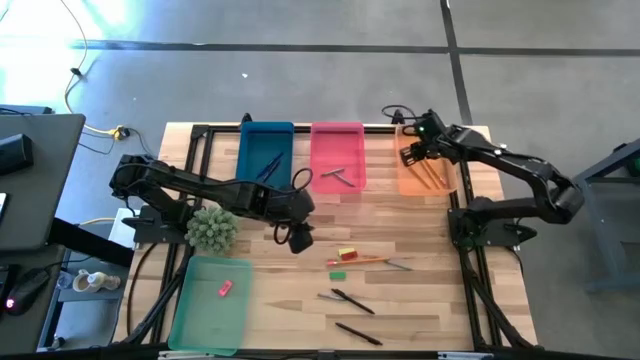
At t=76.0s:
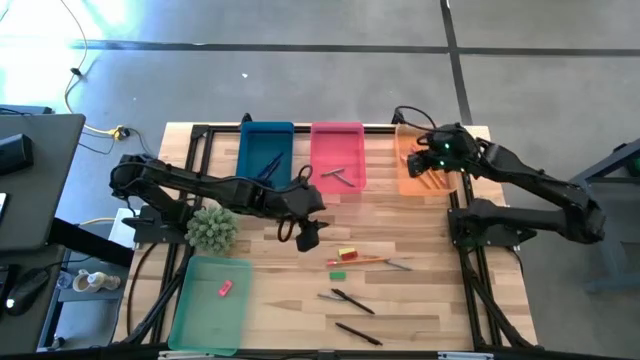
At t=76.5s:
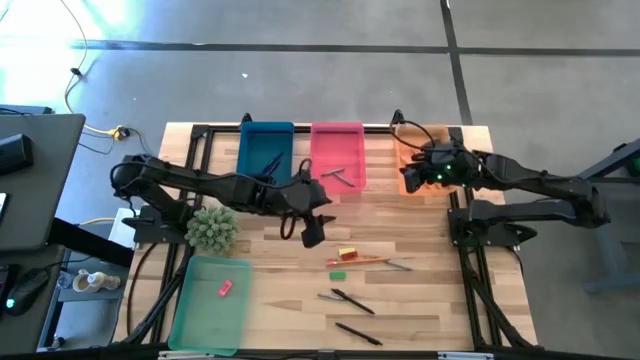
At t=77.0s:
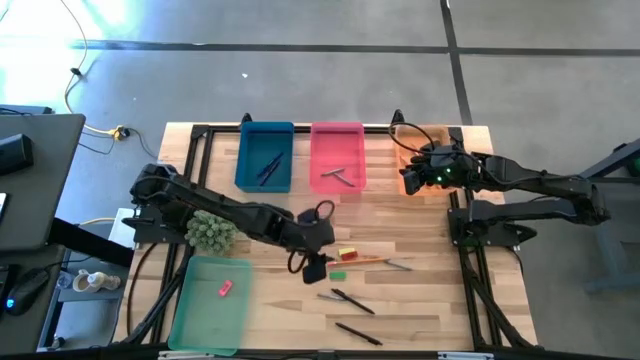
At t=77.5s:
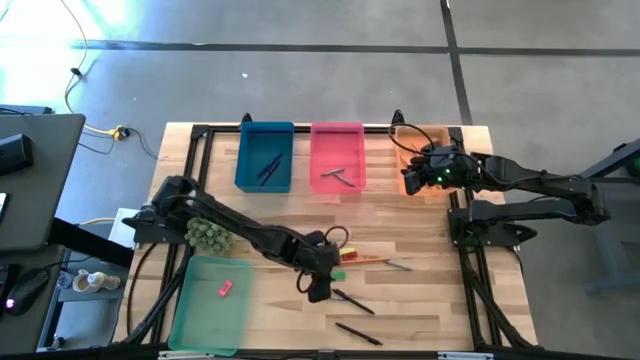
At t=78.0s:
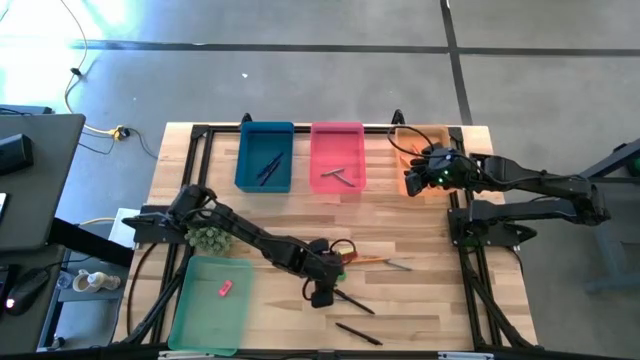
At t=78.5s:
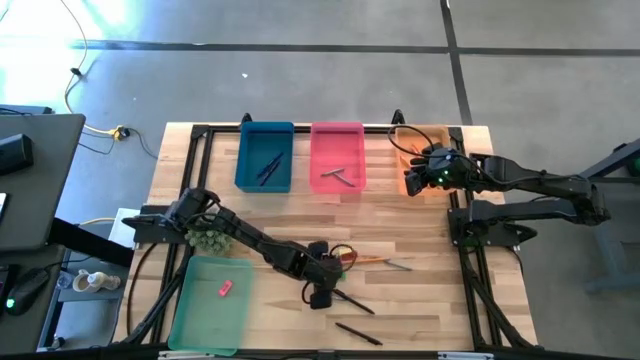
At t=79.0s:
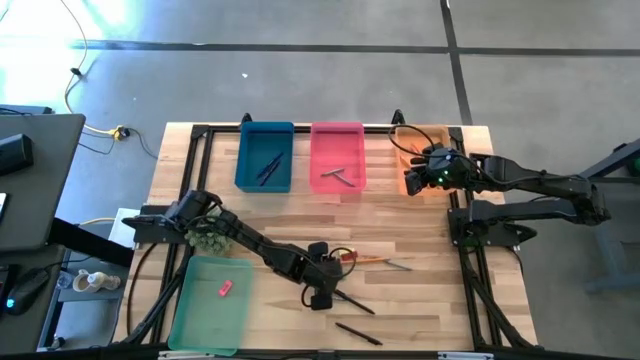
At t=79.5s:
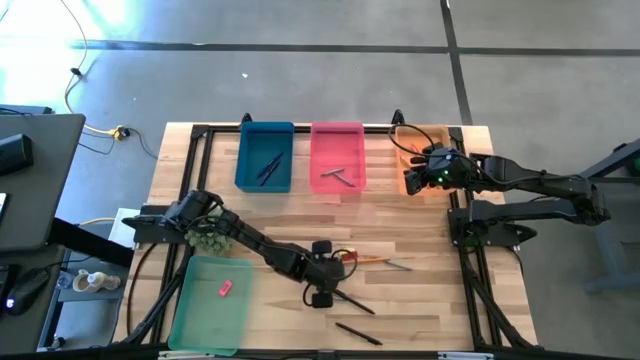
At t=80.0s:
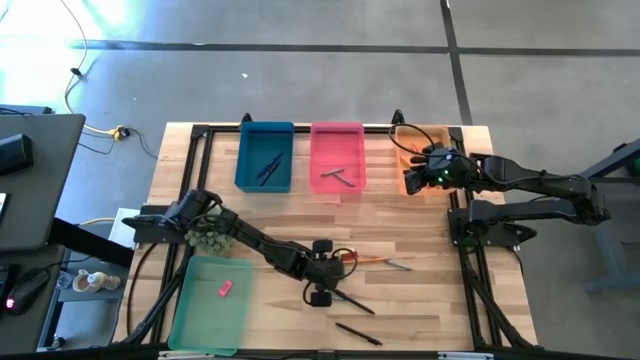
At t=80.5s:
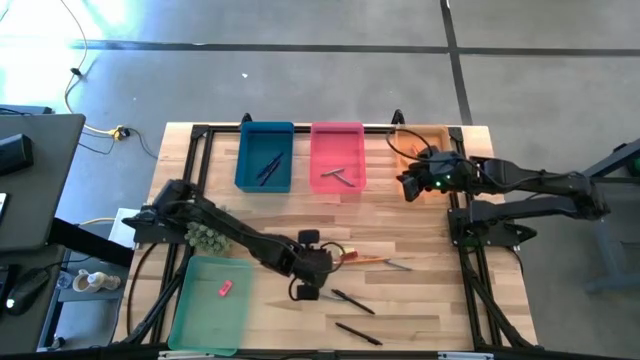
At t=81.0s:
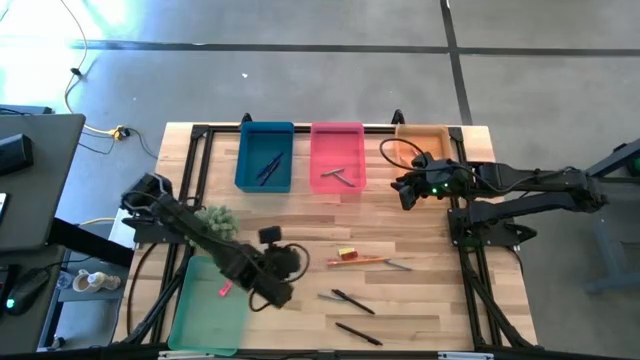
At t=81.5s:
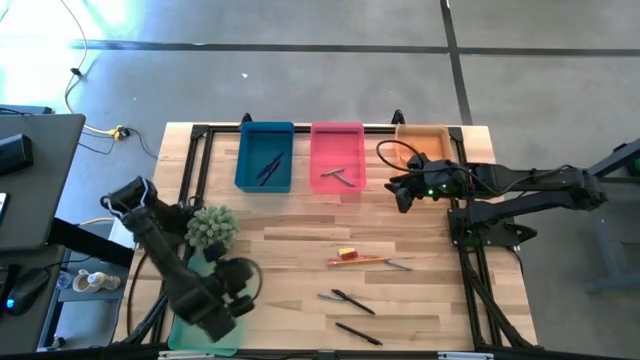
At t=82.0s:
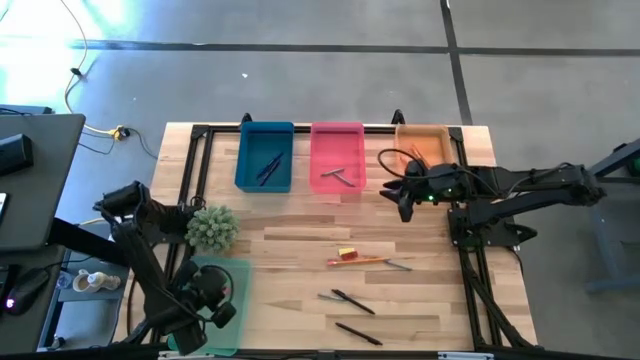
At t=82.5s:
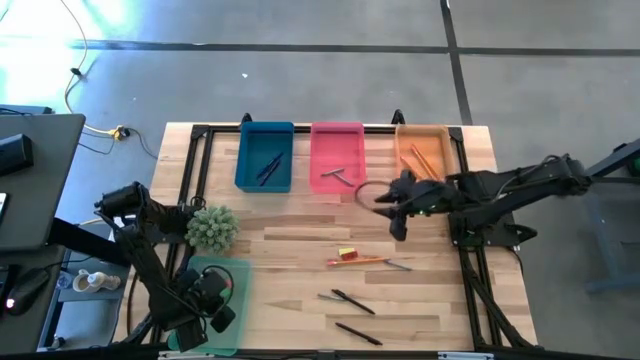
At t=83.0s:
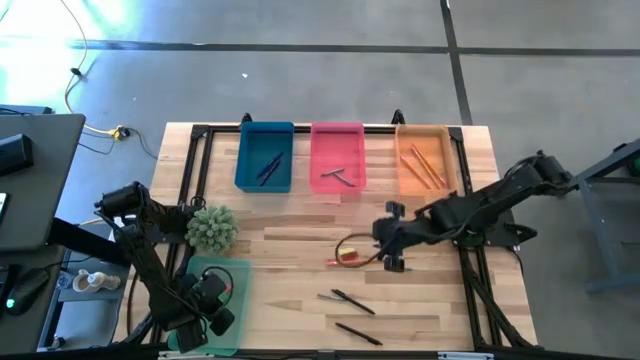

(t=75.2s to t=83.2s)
Task: Sort crayons/erasers/pens/pencils in bins
Put the green eraser into the green bin

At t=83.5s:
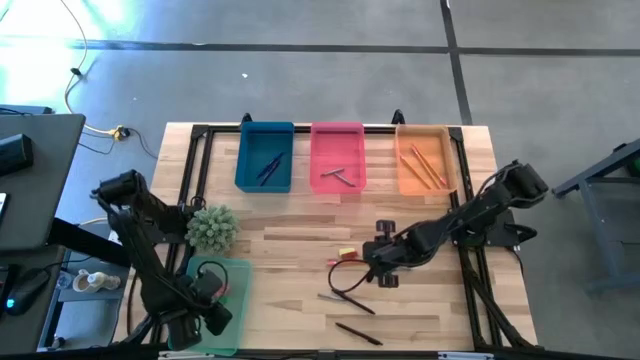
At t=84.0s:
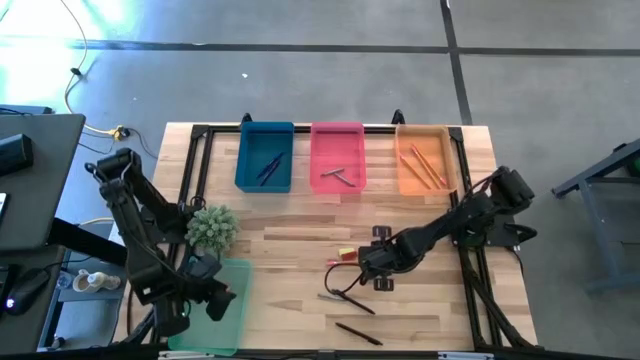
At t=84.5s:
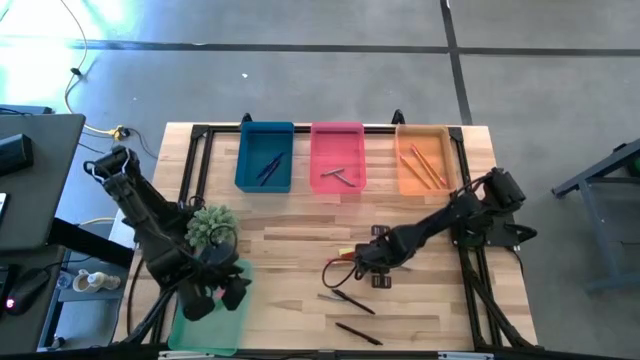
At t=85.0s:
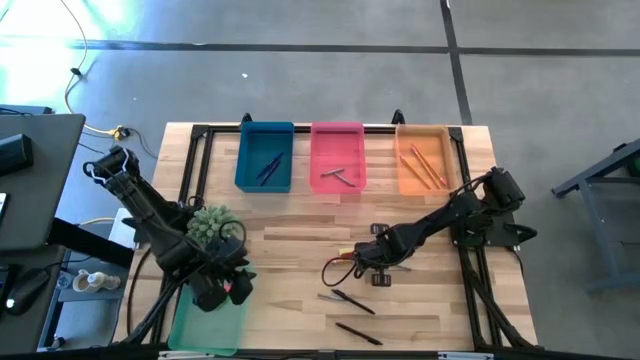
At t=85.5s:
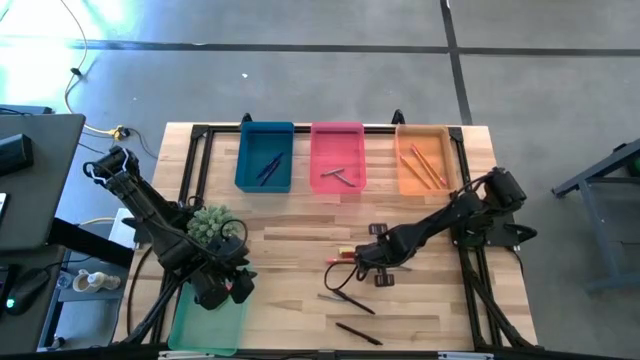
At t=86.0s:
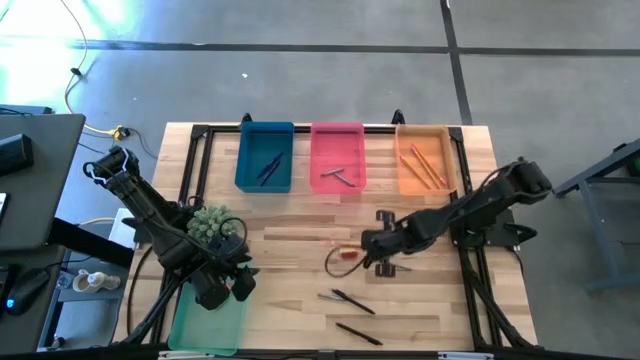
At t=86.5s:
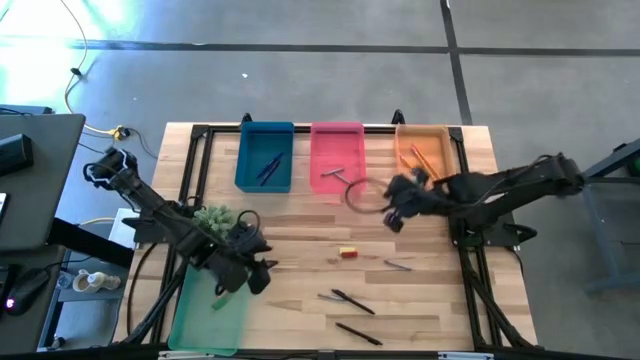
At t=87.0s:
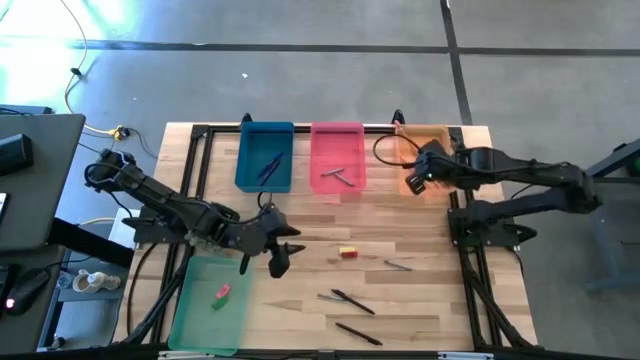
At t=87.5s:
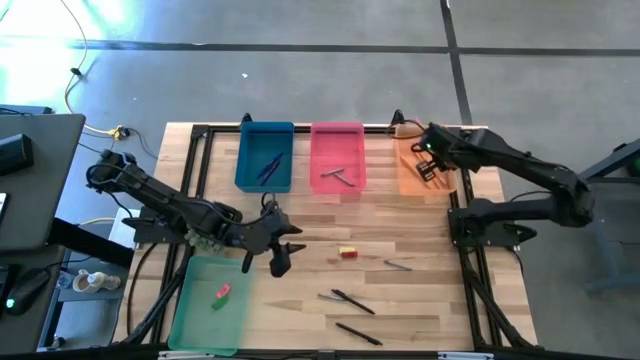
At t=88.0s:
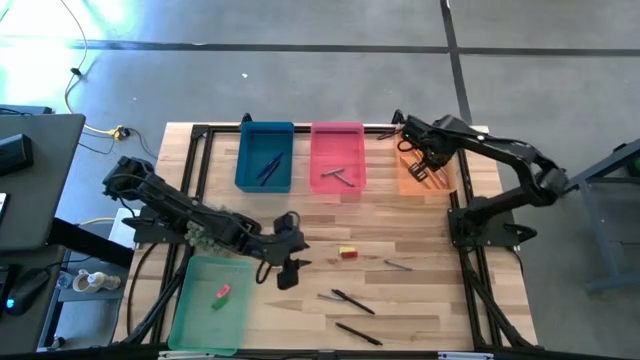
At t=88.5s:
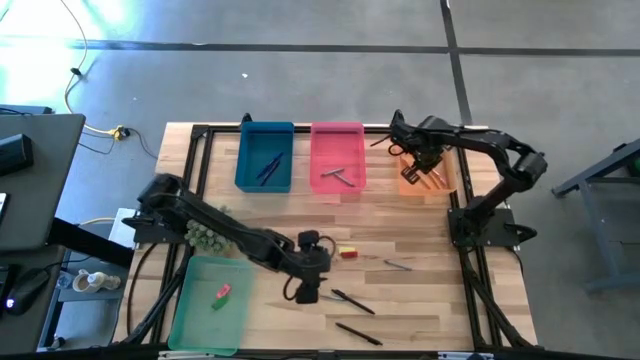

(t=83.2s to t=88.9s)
Put the orange pencil into the orange bin

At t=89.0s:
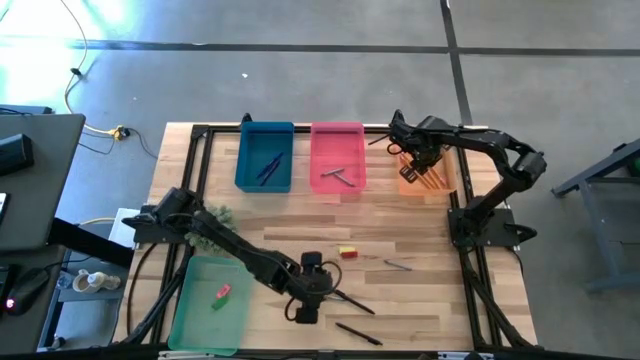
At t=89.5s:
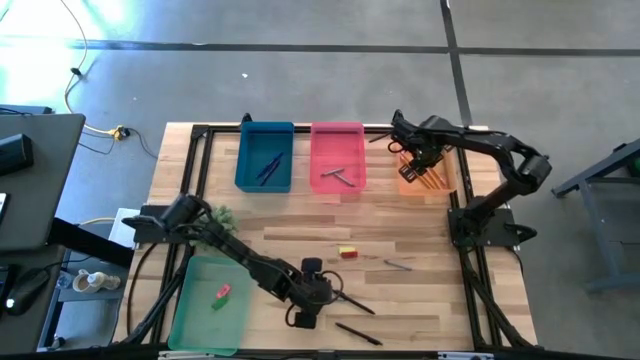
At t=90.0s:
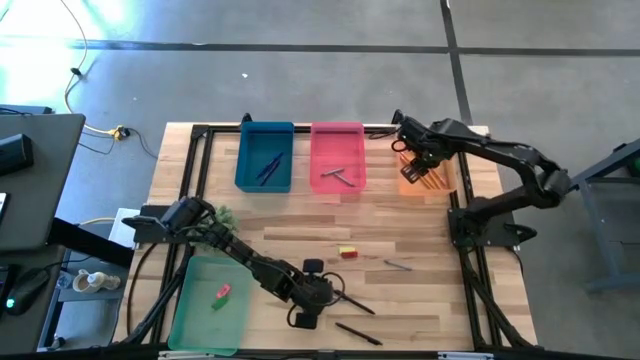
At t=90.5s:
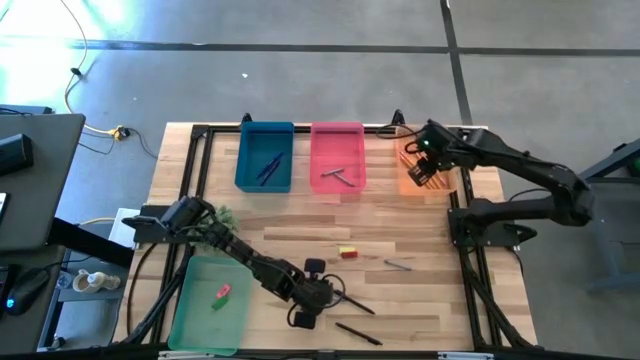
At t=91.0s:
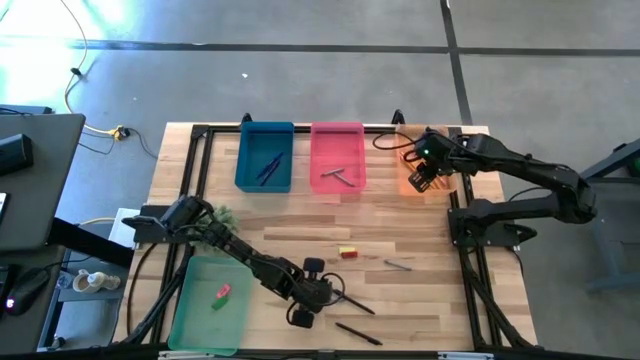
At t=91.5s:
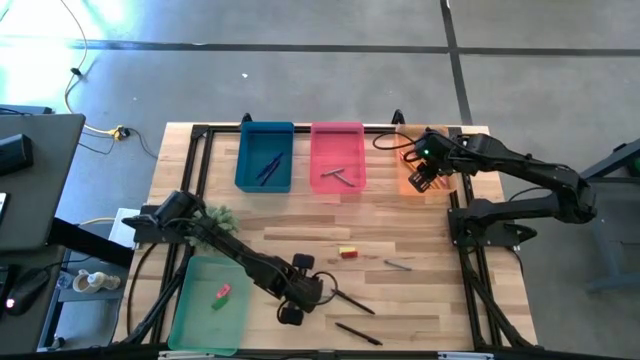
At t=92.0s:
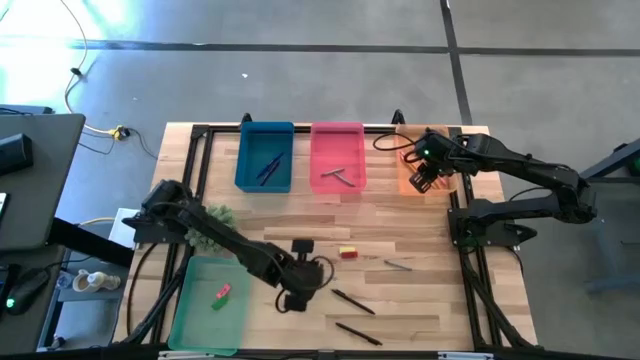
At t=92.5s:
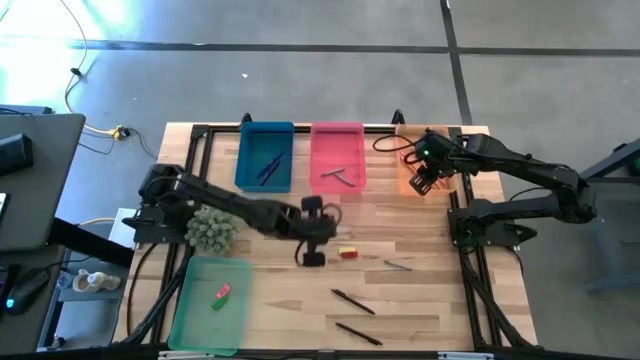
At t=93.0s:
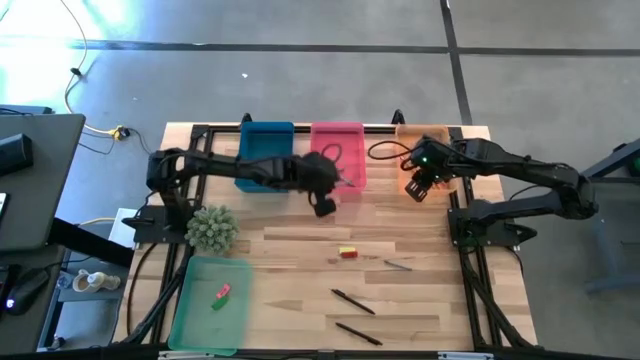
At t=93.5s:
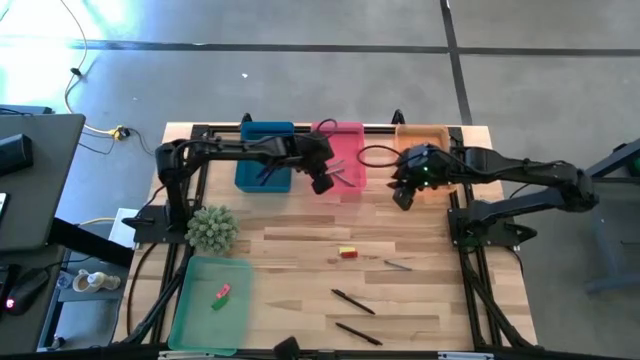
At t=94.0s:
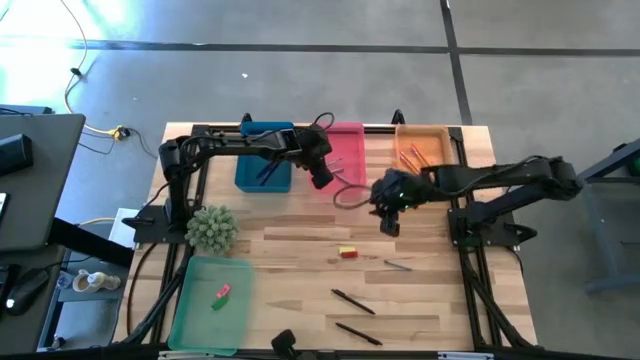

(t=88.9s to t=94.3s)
Put the gray crayon into the pink bin

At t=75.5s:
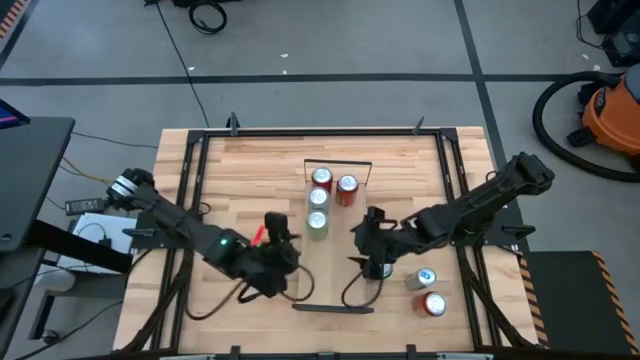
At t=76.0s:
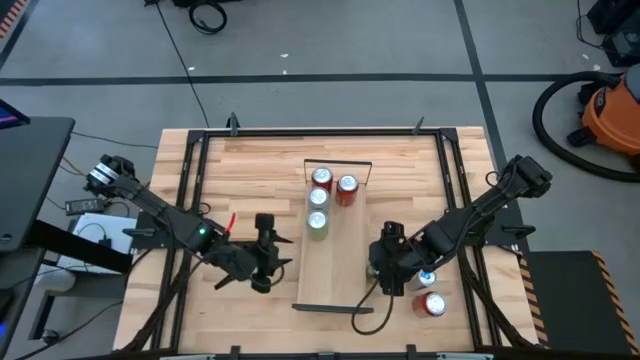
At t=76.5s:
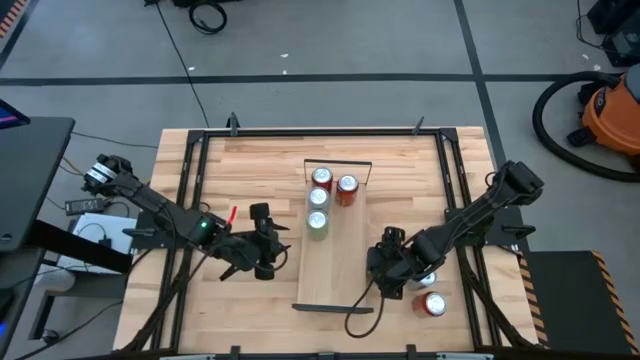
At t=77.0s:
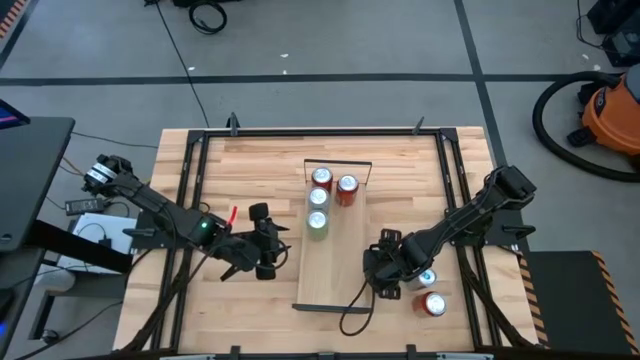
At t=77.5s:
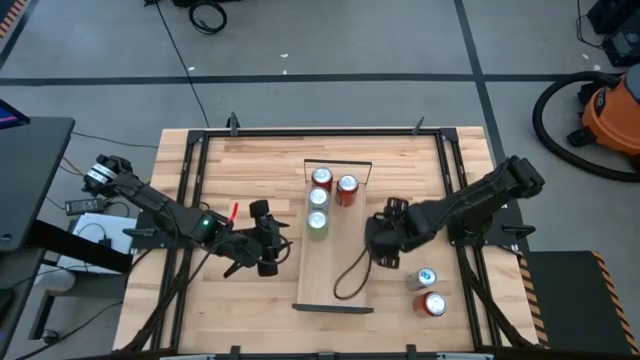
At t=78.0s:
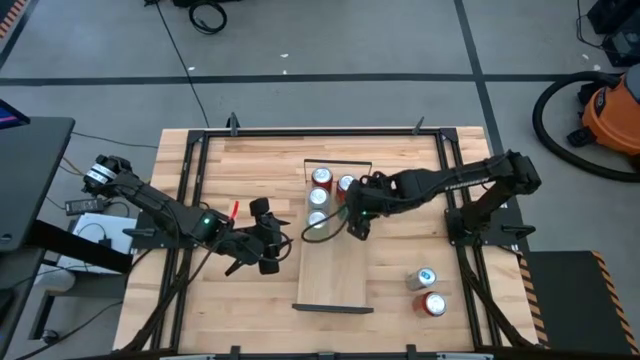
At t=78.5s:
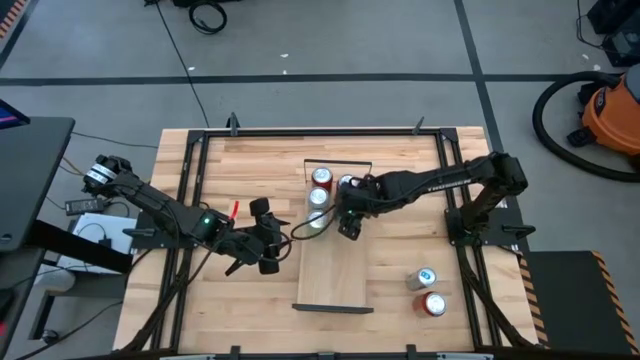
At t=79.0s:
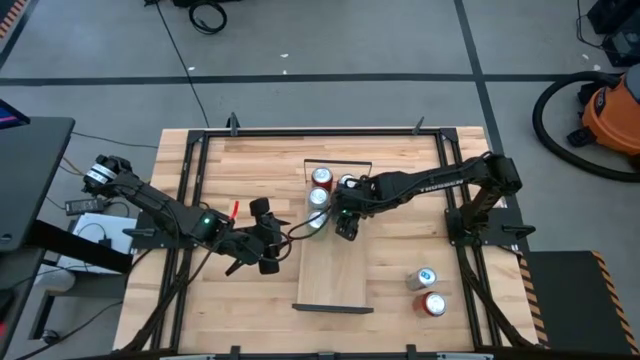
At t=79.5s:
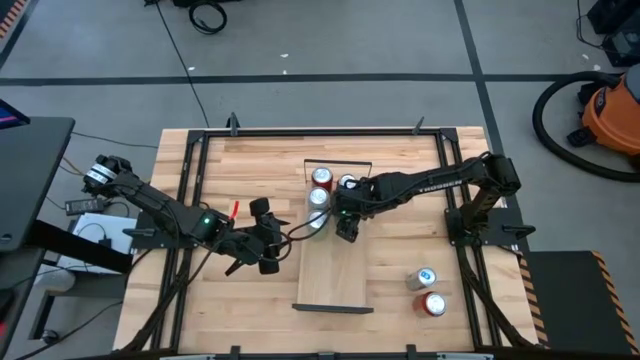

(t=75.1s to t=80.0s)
Task: Place canned beverage on shelf
Put the green/white soda can on the shelf
